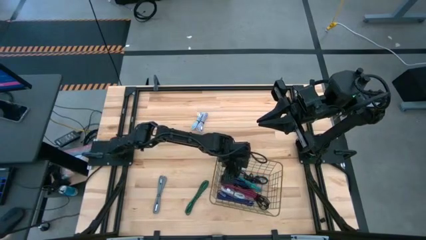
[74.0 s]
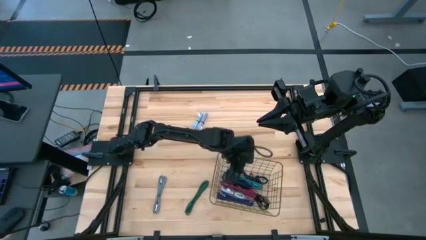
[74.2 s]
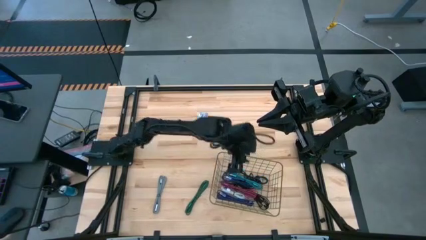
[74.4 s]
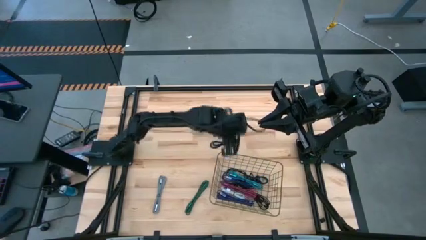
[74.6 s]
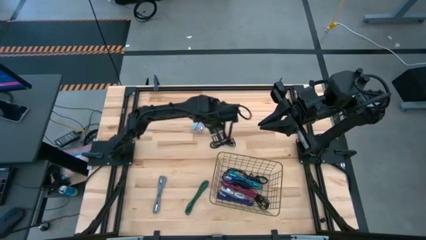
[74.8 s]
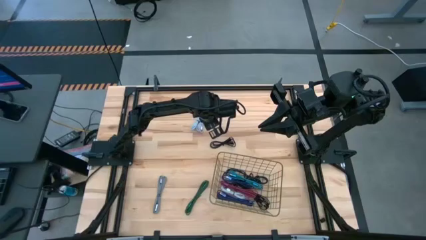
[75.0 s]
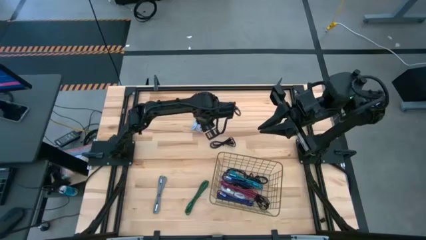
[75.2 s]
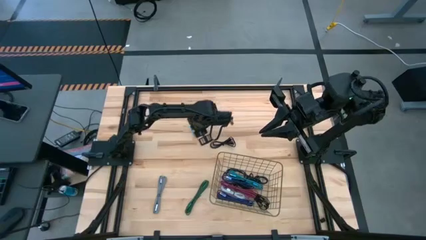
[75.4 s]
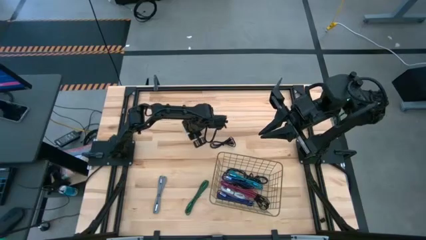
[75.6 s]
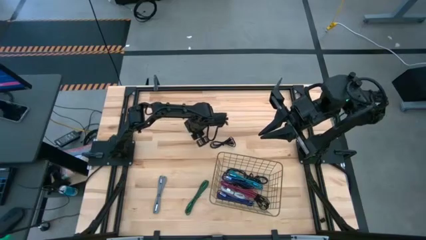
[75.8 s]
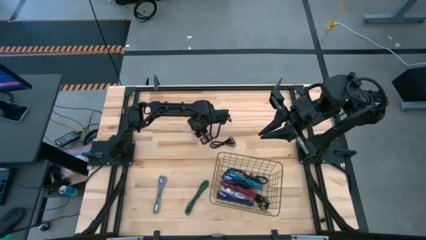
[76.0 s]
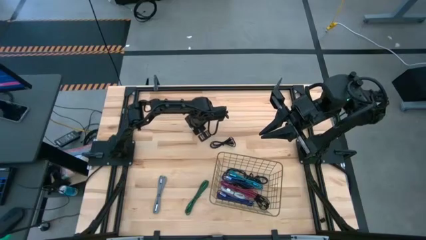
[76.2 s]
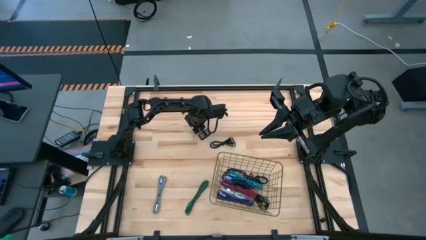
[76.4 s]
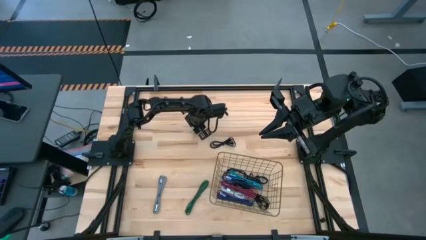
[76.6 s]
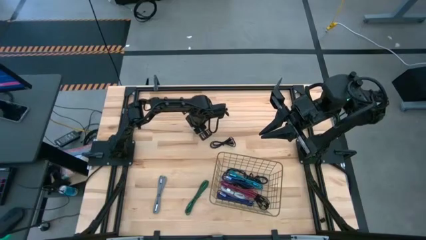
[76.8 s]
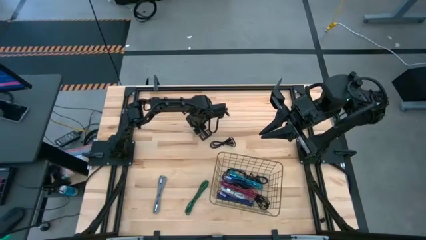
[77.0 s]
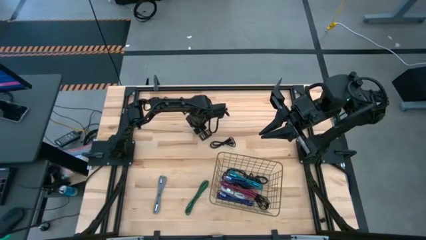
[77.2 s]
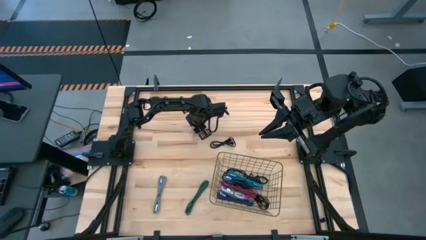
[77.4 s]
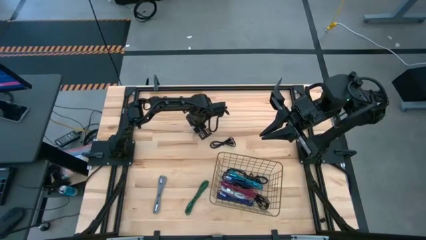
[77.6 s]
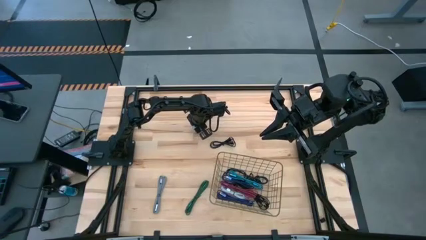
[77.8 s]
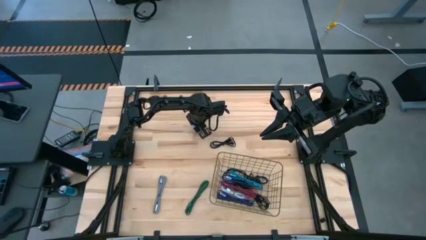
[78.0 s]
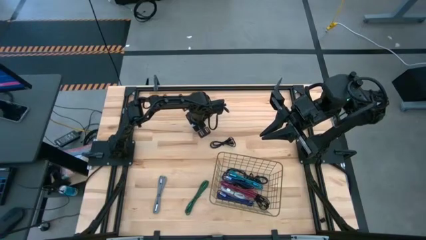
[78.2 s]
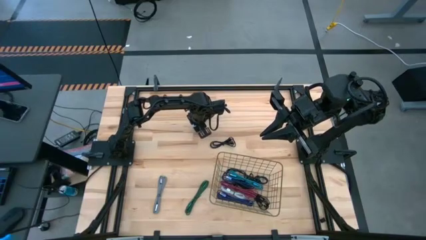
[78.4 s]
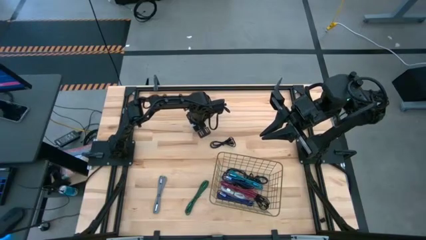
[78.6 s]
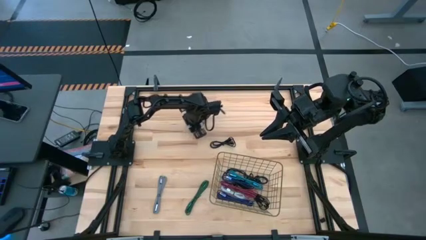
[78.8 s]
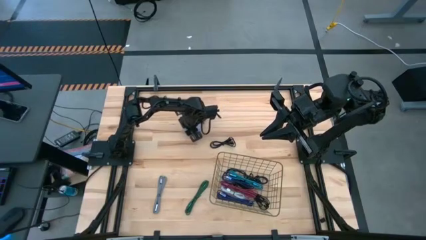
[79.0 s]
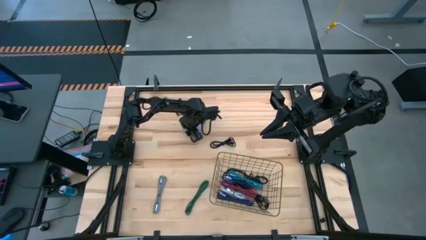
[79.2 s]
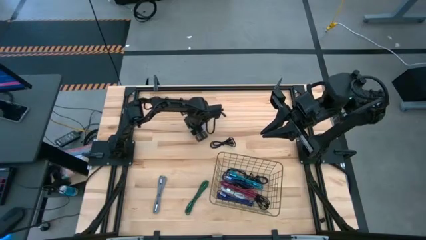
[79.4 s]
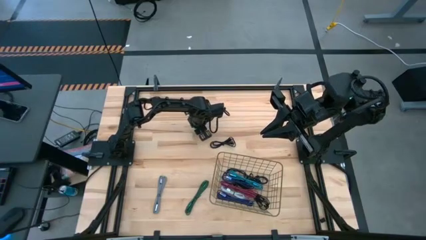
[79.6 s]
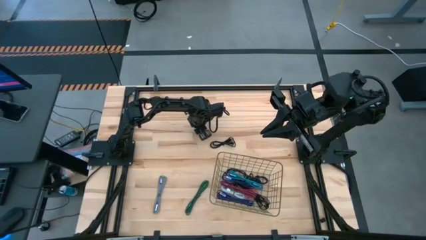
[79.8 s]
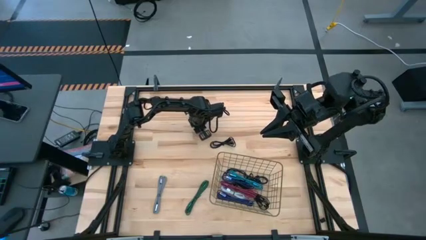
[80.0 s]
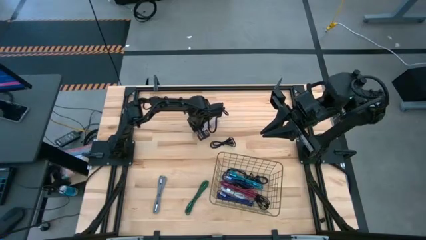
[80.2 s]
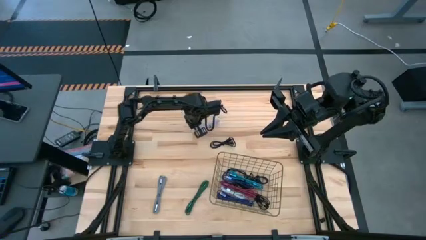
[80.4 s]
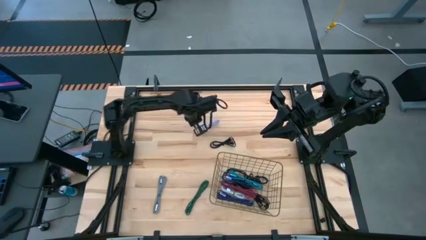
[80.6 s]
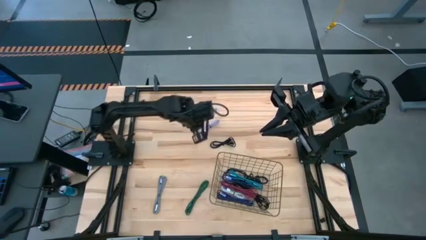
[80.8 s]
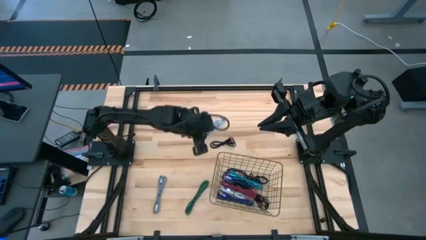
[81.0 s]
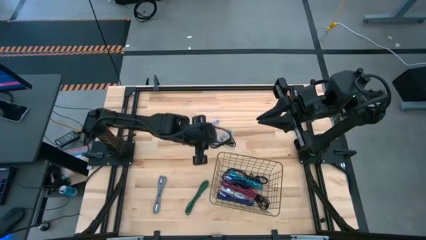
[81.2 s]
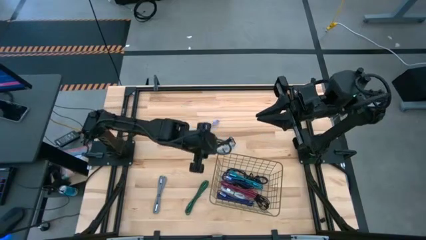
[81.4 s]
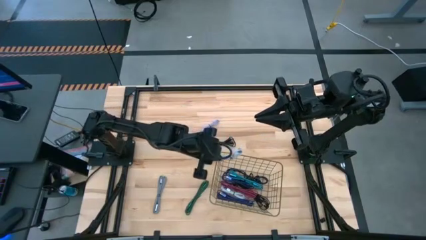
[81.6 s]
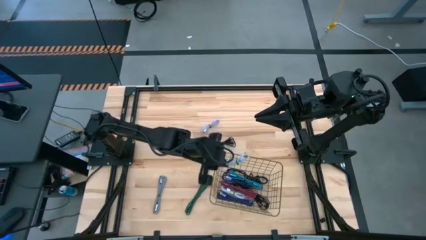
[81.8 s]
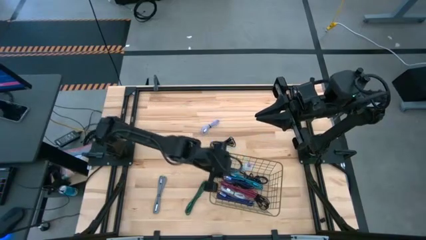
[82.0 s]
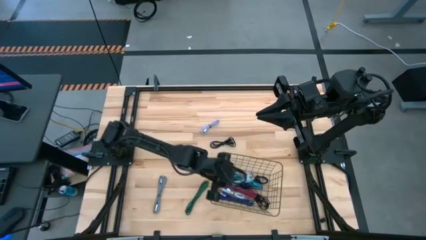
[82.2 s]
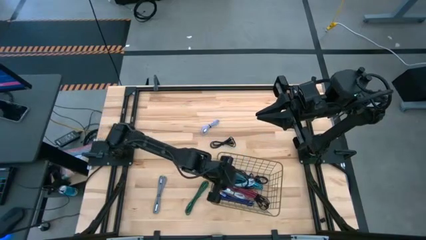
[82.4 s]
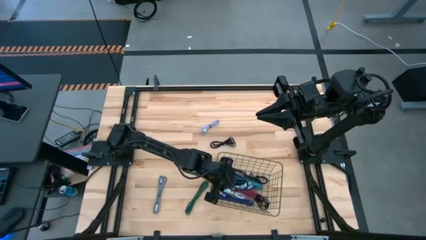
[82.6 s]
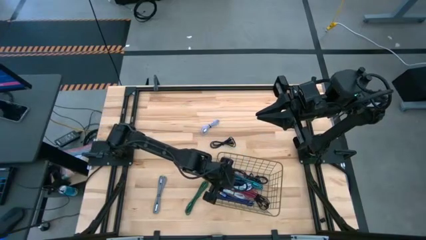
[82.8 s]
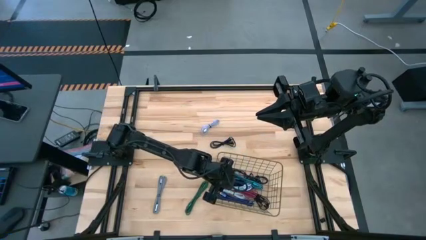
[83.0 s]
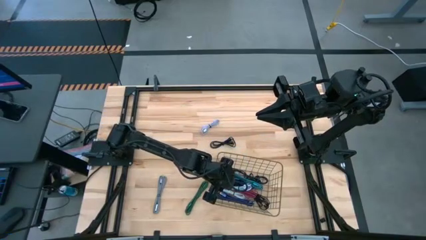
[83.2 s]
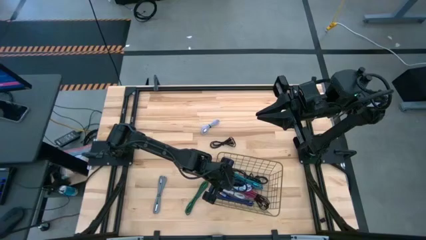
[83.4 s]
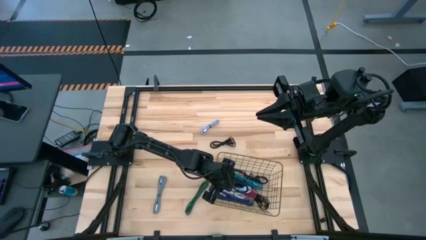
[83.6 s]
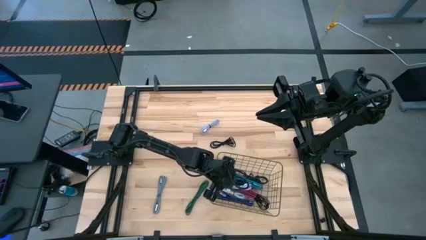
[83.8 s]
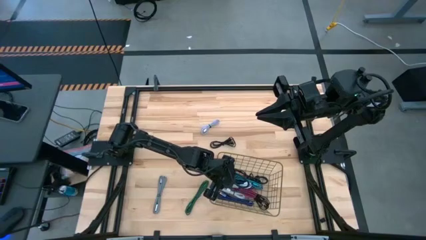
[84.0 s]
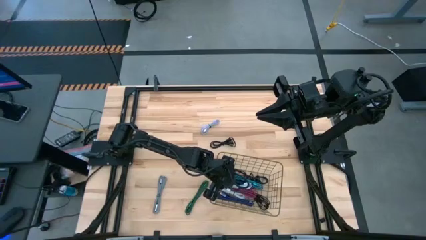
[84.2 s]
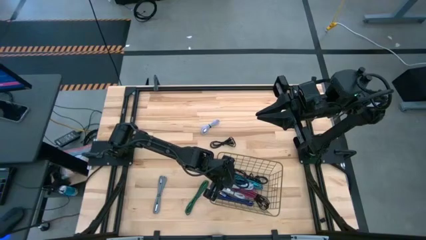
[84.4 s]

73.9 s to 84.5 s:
Task: Pick and place USB-C Cables
Put the light blue charger cable into the wire basket

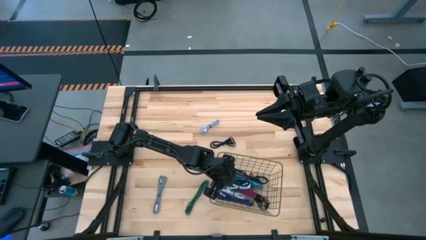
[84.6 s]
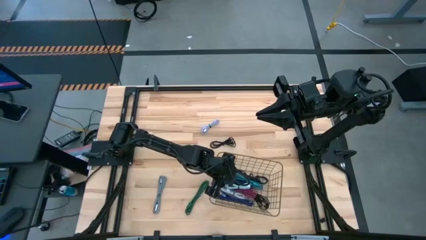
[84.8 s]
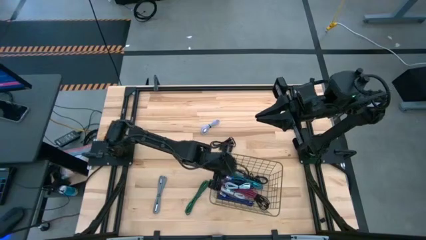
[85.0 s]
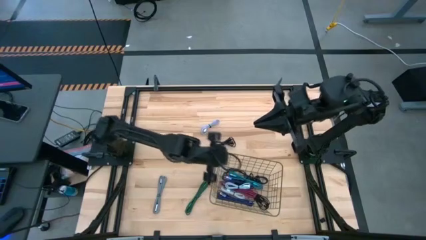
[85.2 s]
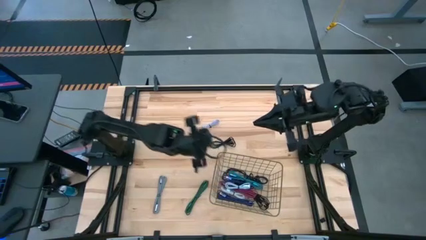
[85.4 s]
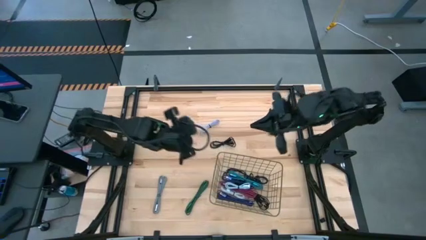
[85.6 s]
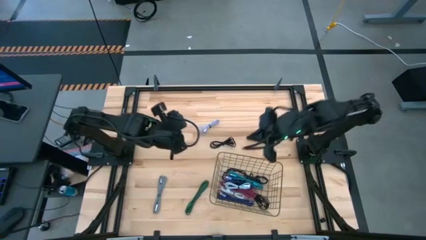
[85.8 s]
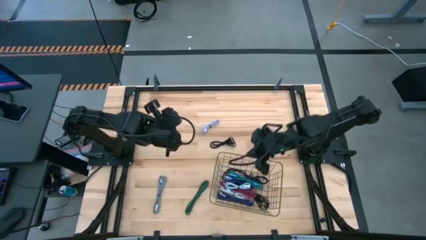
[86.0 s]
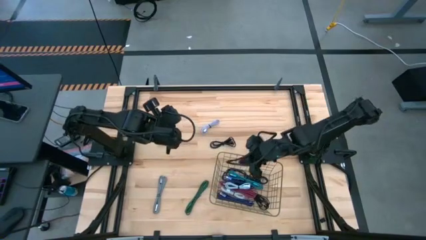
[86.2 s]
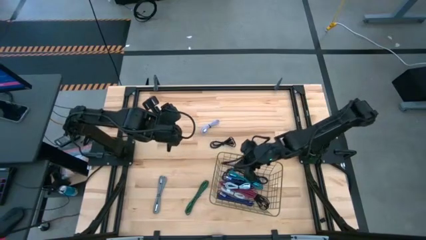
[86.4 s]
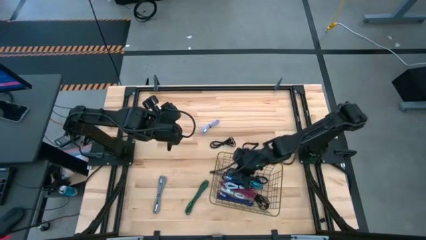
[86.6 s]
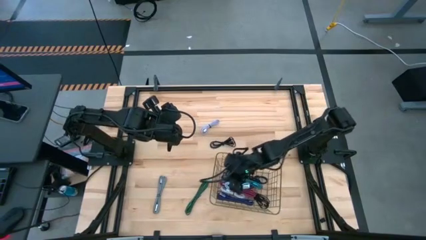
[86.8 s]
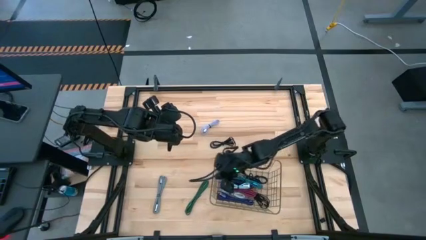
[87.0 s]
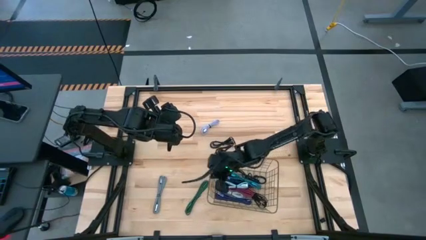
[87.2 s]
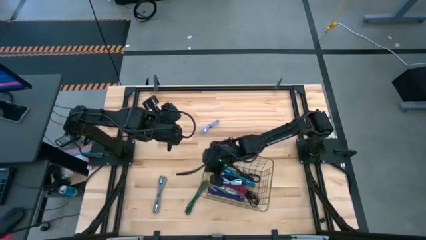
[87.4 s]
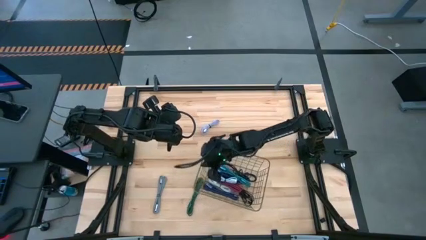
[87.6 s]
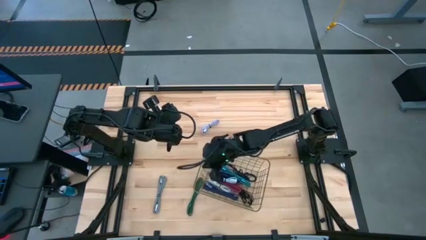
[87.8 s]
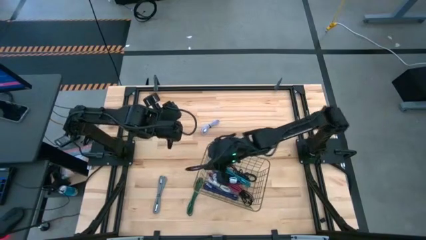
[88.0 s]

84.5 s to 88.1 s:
Adjust the wire basket
